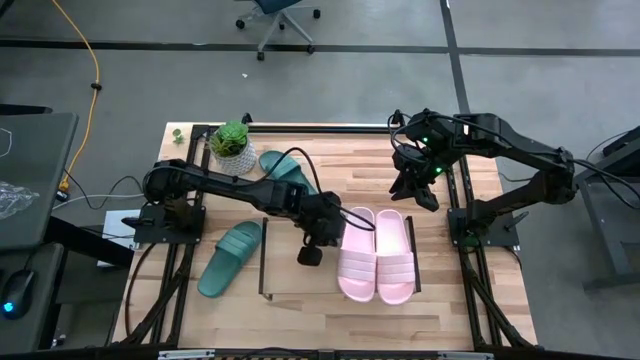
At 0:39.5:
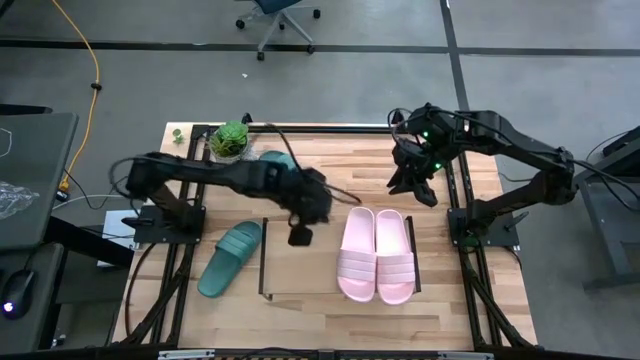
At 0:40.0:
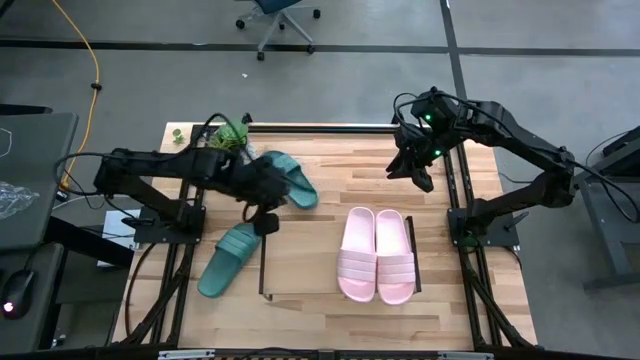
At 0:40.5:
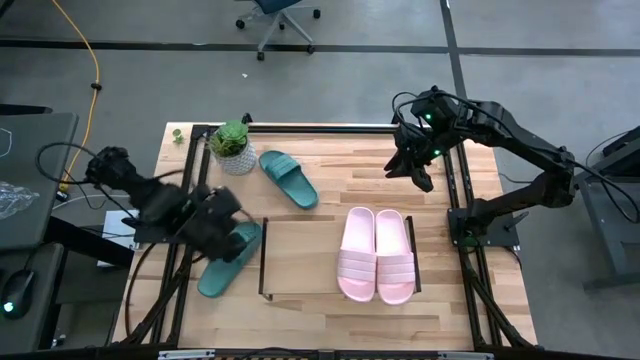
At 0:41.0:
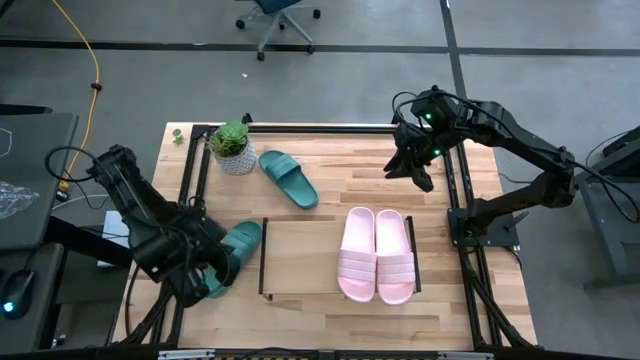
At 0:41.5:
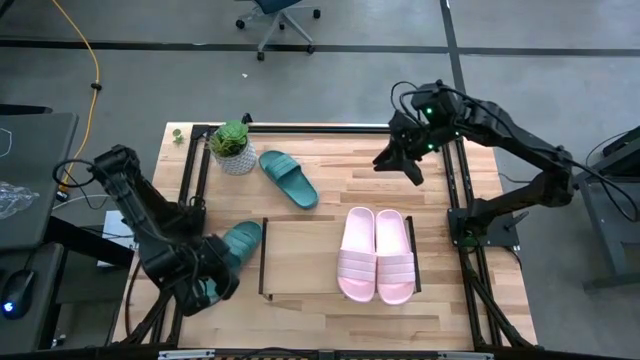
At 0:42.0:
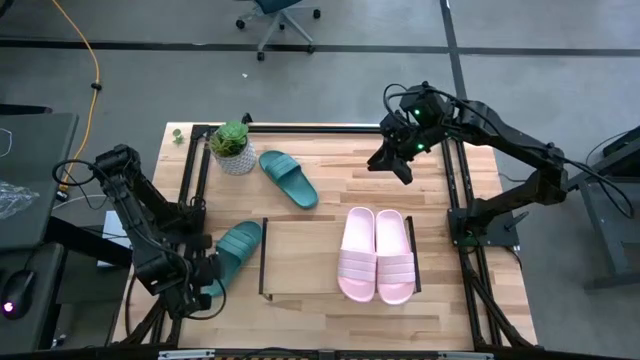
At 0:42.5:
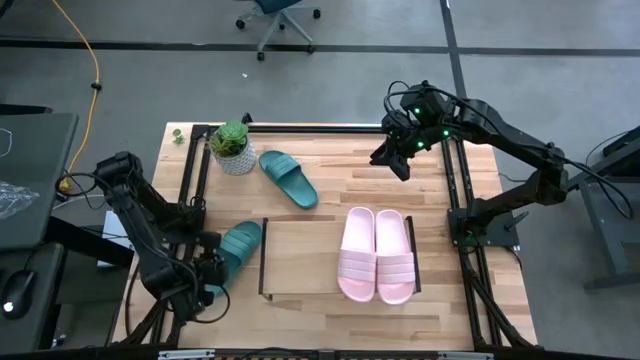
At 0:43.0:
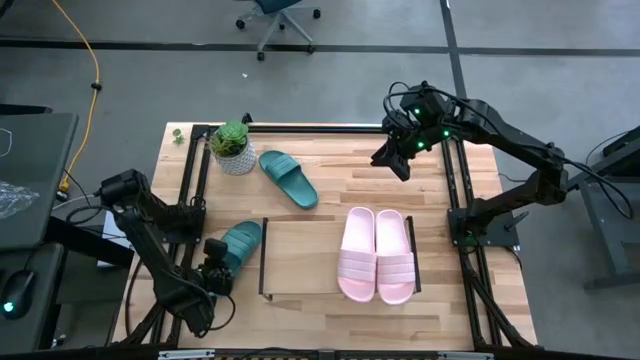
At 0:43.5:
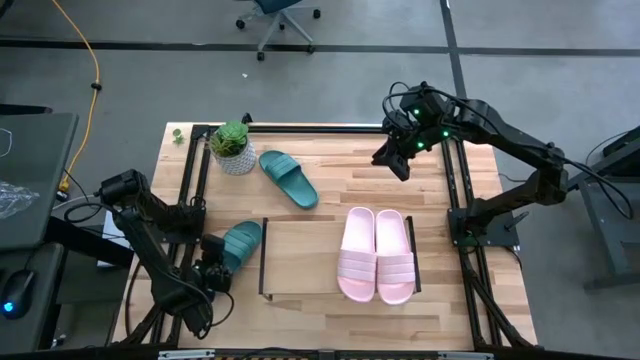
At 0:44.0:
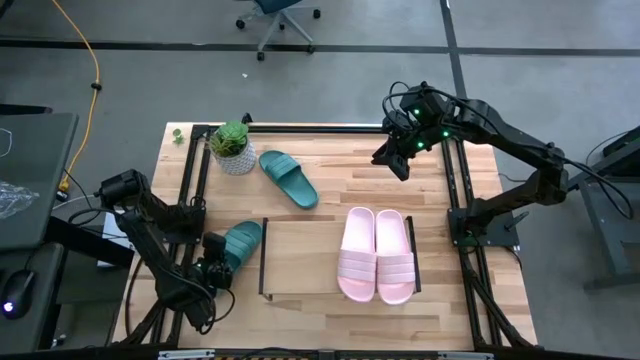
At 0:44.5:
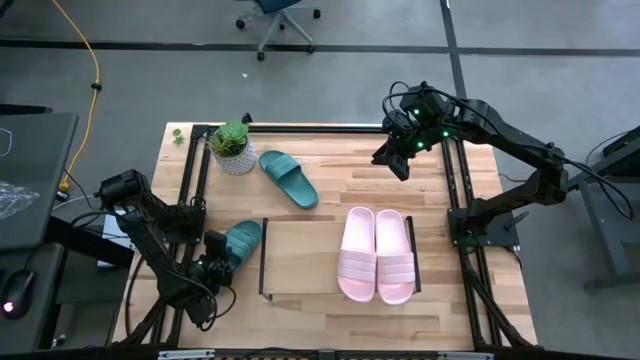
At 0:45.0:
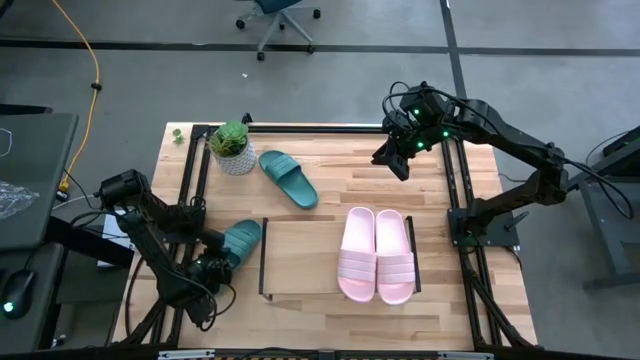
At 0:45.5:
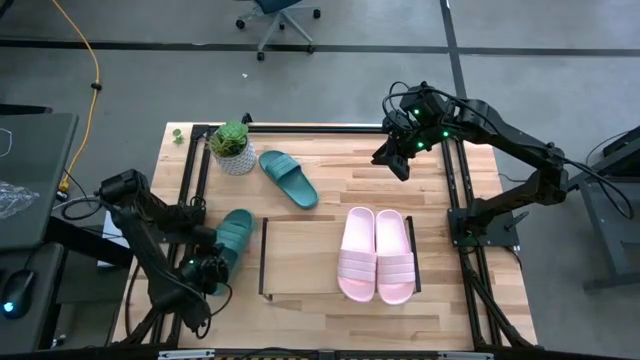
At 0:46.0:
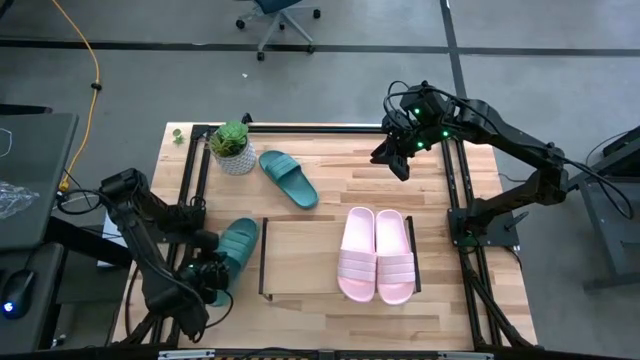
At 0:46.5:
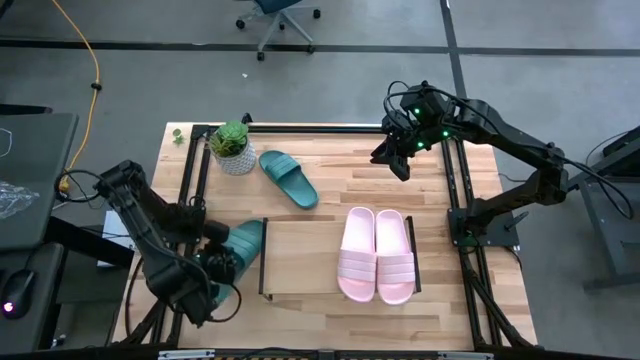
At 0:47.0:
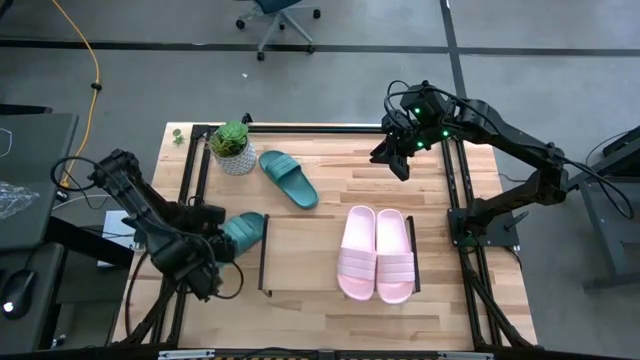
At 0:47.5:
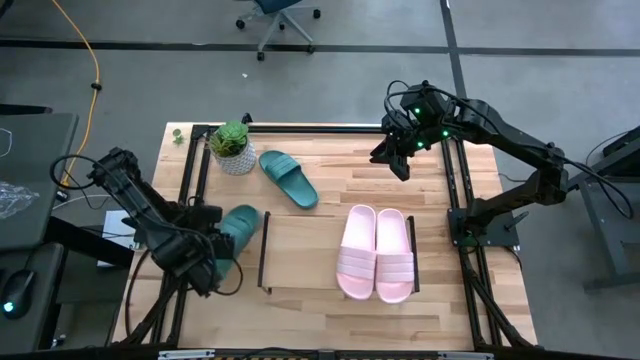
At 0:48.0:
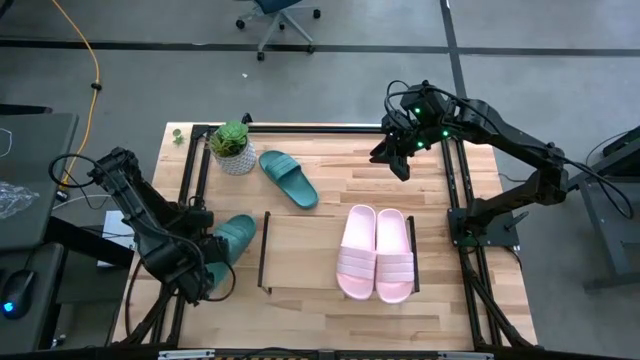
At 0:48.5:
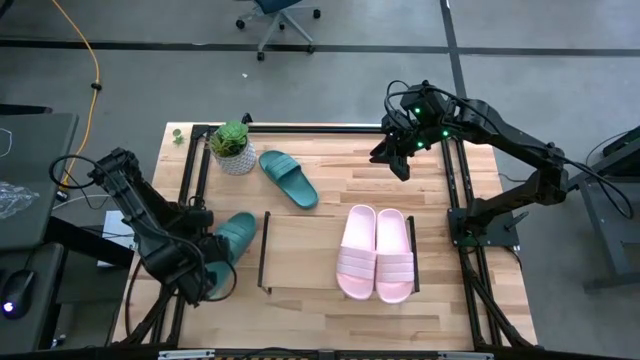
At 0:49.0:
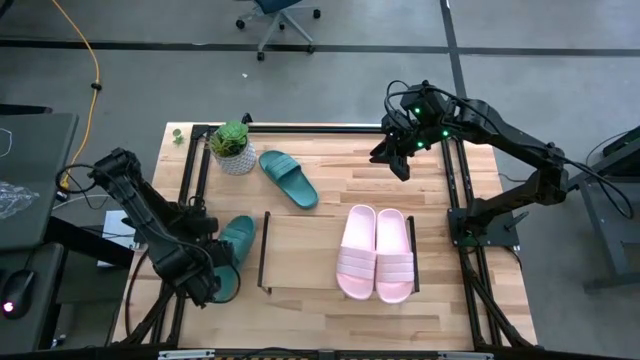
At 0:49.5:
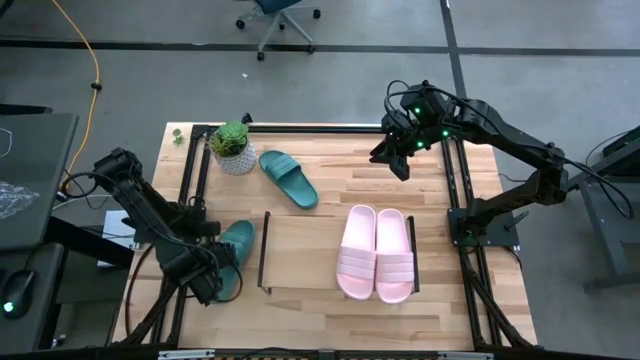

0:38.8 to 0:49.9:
Task: Pick and place slides into the shelf
Put the bottom green slide on the shelf

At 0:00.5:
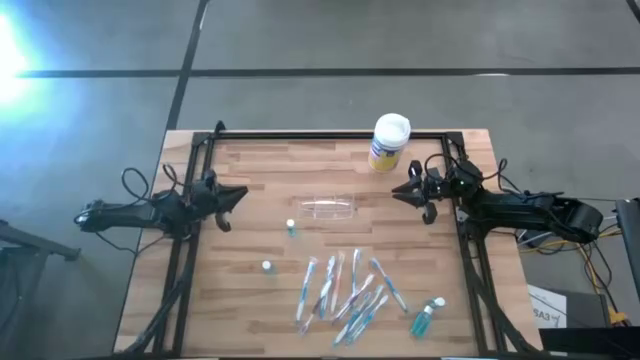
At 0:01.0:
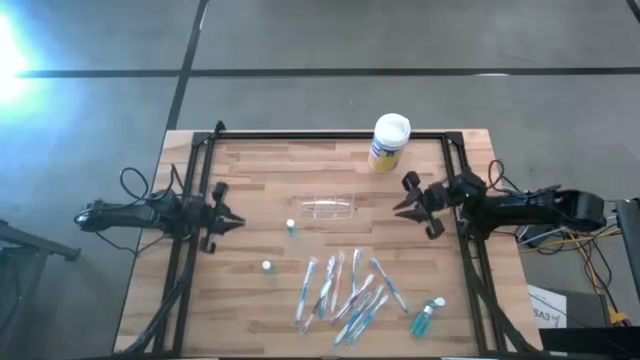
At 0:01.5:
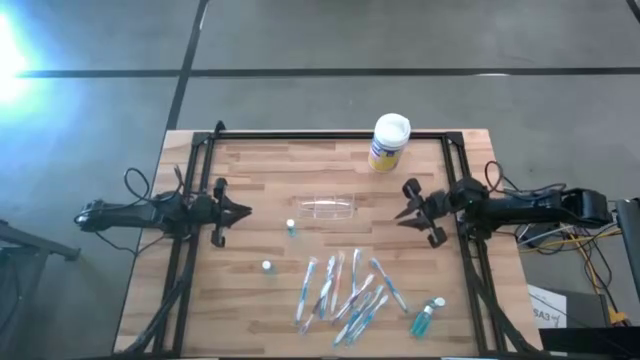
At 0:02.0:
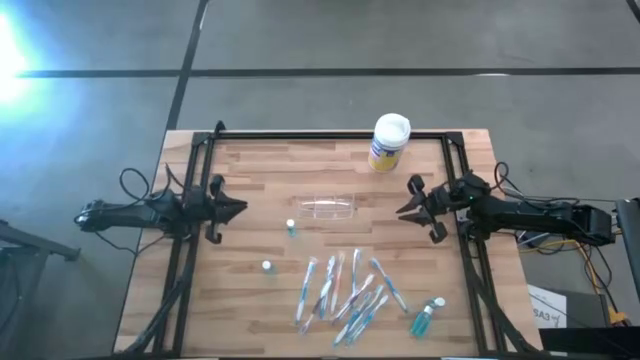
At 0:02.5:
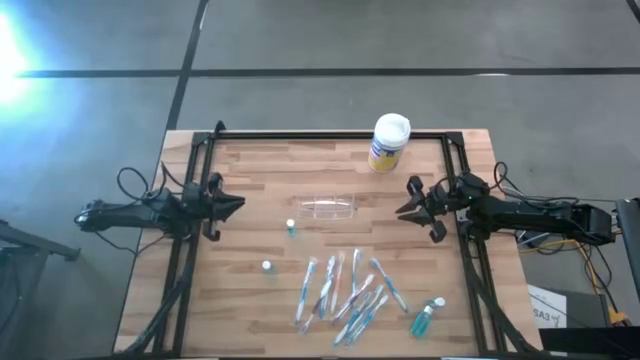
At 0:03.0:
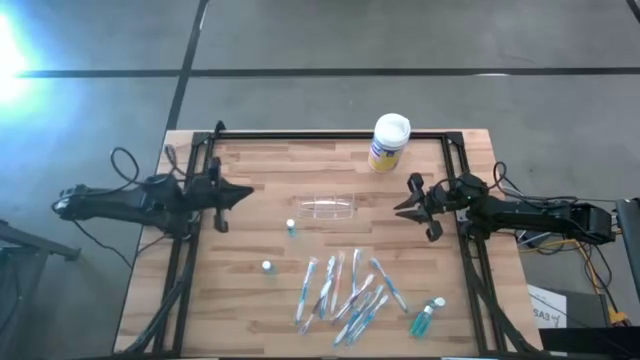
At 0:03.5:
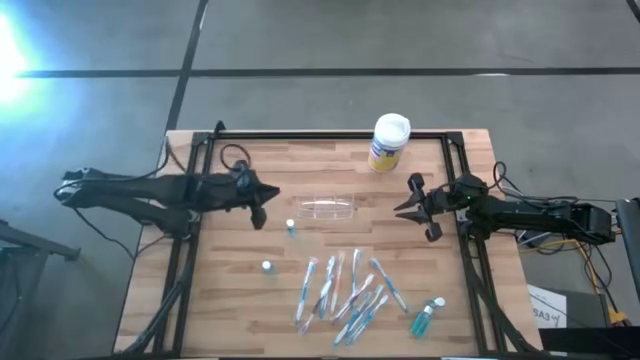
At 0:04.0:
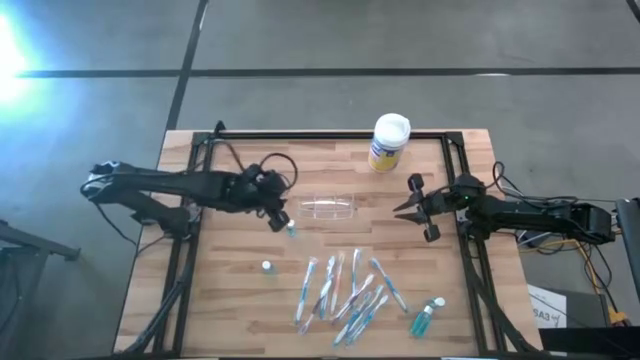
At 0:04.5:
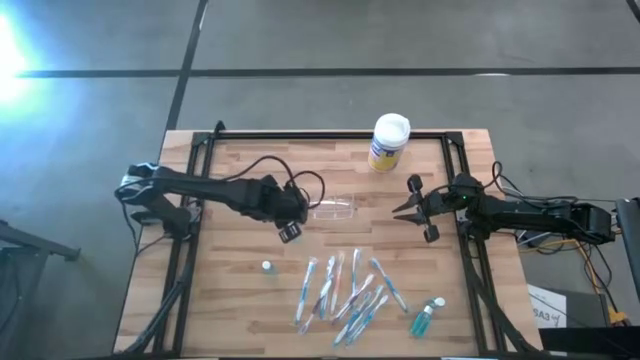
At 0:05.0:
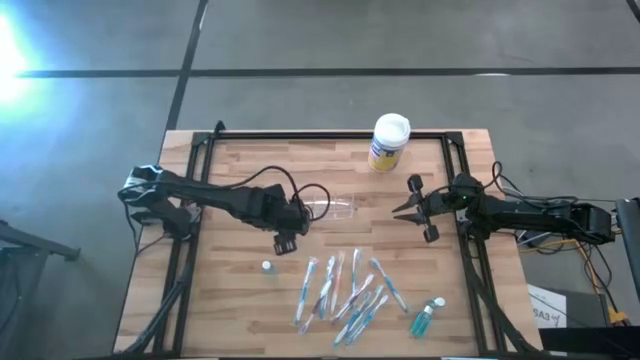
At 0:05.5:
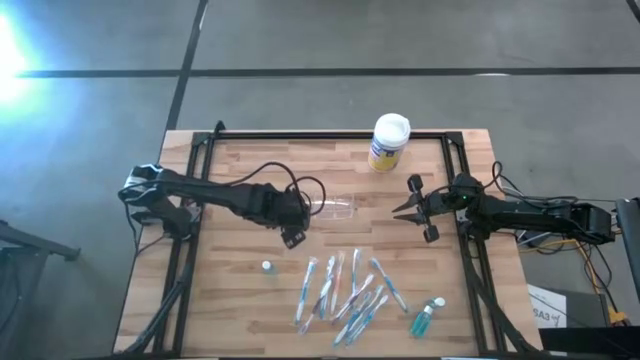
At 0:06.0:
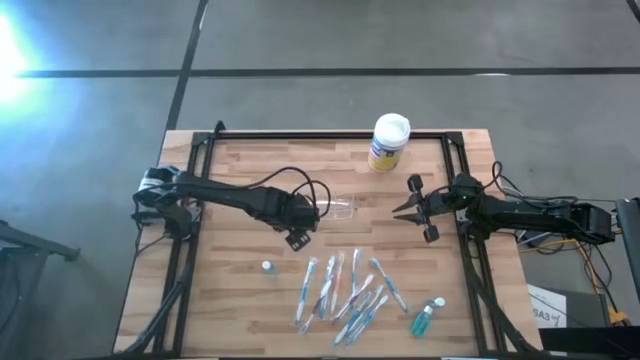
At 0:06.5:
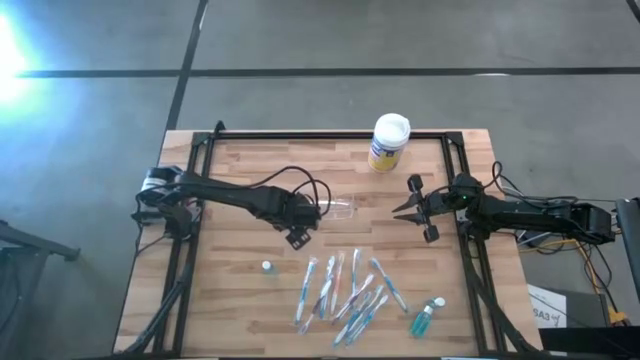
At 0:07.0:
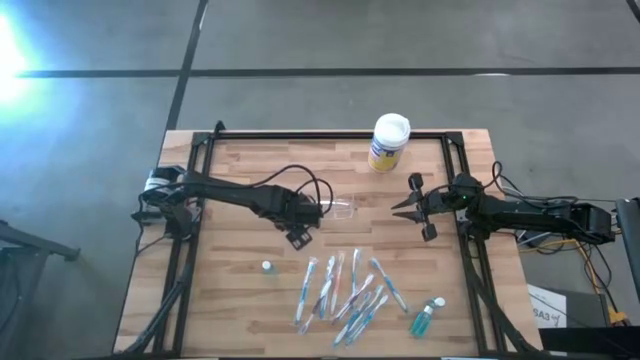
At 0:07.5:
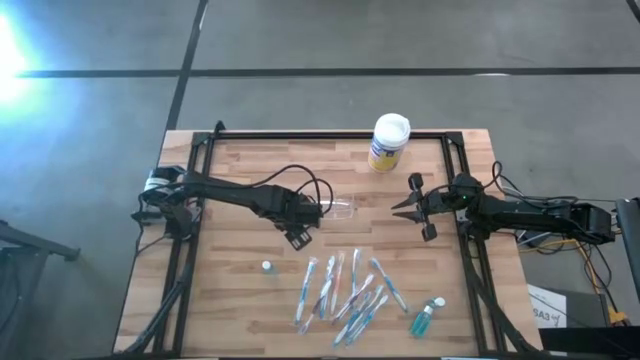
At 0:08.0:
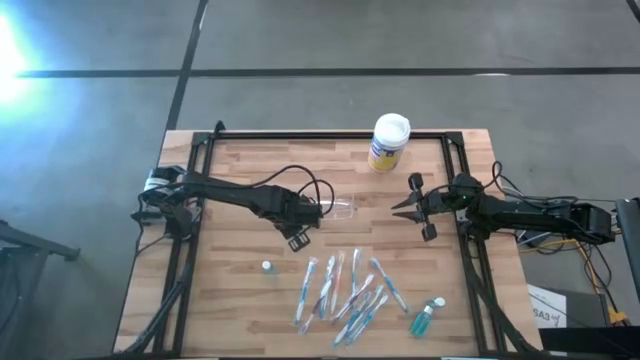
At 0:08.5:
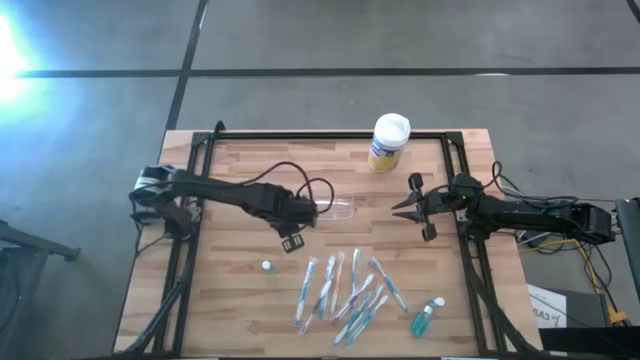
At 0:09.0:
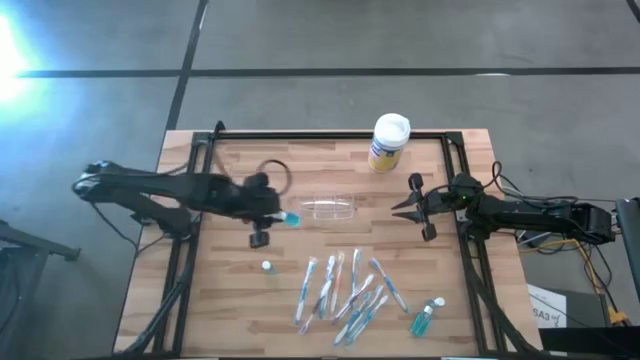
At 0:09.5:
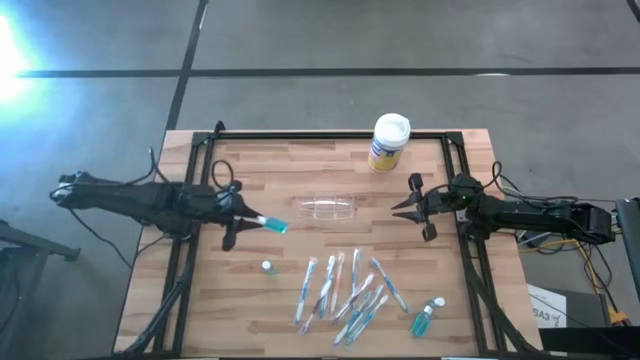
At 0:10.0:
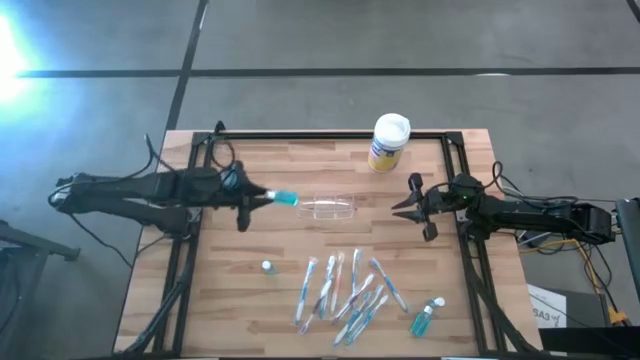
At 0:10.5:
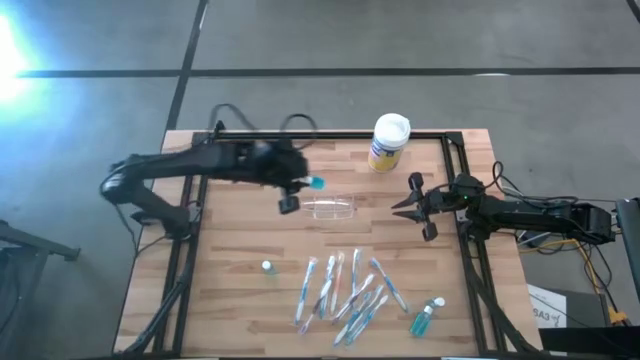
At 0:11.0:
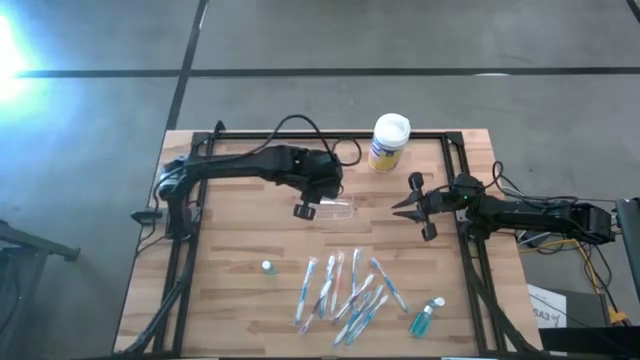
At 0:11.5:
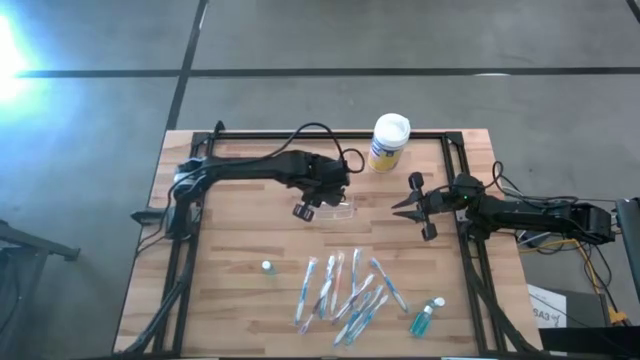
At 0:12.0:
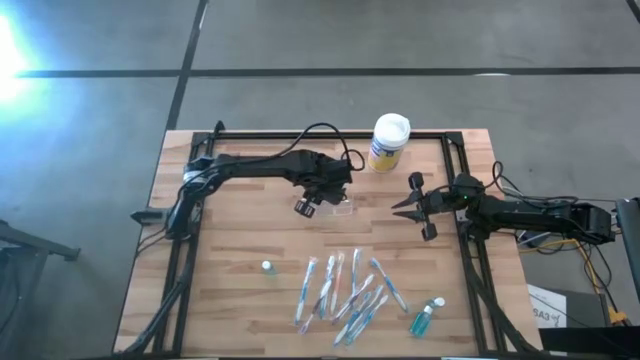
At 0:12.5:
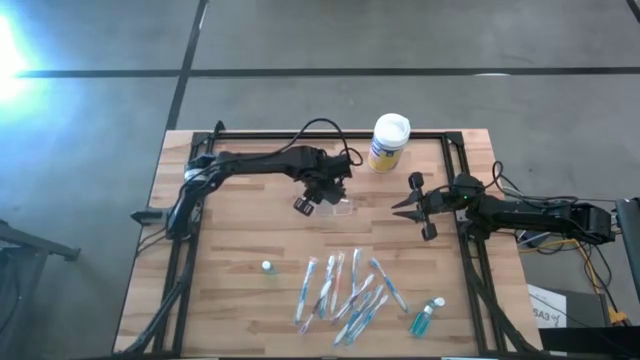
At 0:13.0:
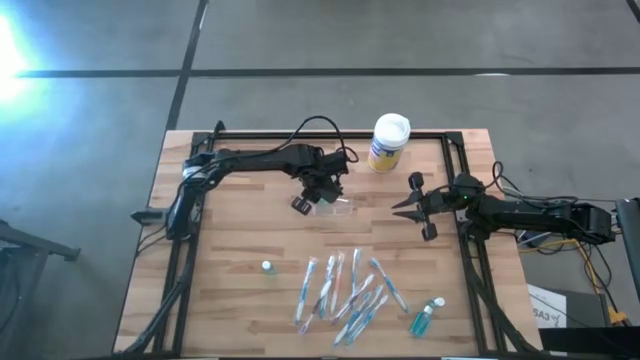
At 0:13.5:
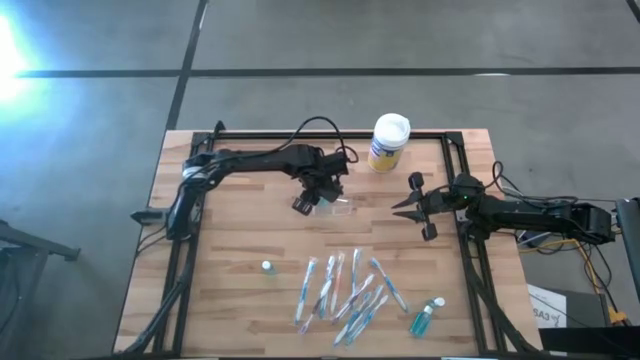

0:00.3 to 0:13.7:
Task: Pick & Place toothbrushing station
Put the blue mouthwash into the transparent organizer
